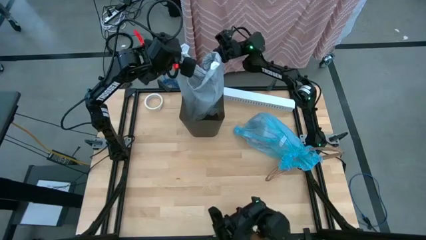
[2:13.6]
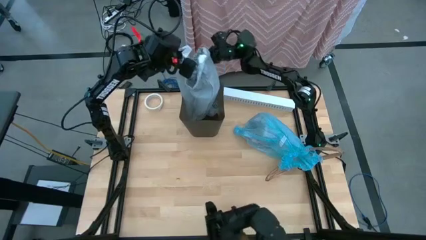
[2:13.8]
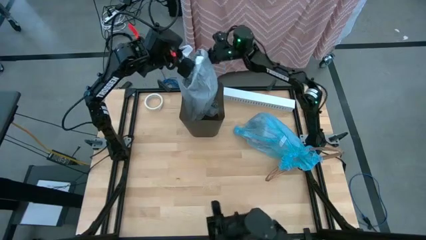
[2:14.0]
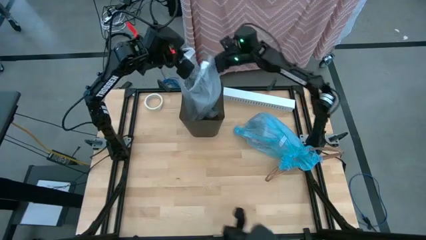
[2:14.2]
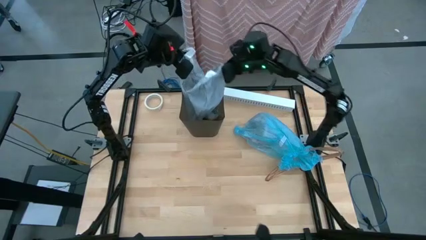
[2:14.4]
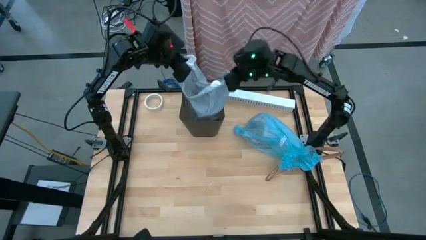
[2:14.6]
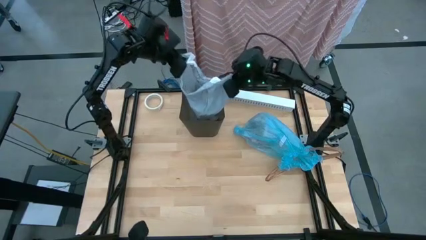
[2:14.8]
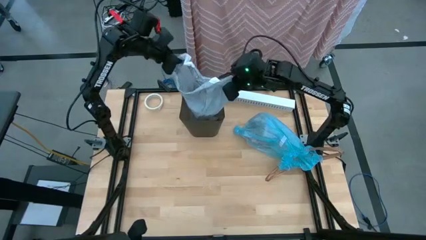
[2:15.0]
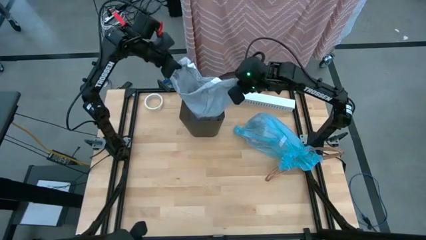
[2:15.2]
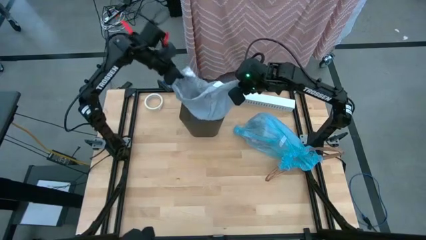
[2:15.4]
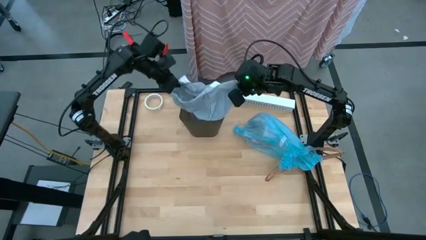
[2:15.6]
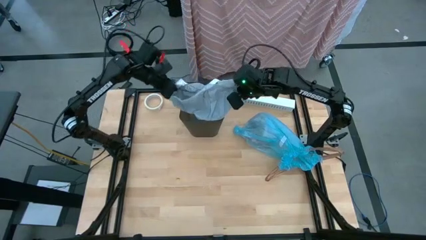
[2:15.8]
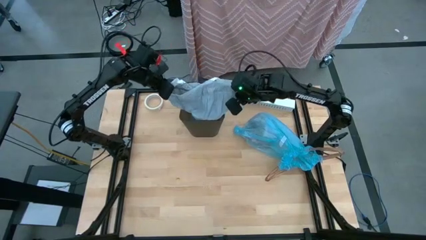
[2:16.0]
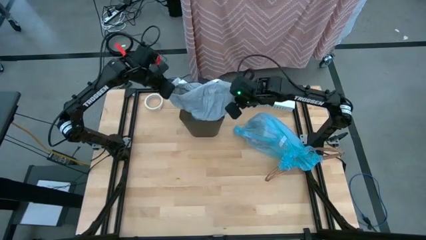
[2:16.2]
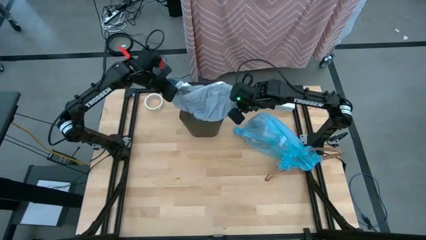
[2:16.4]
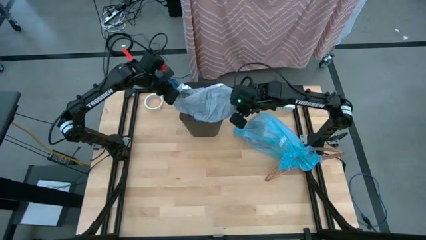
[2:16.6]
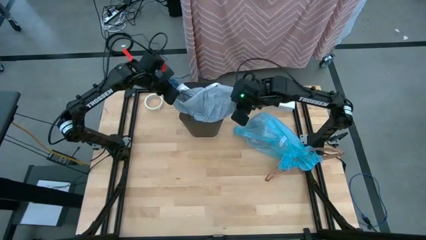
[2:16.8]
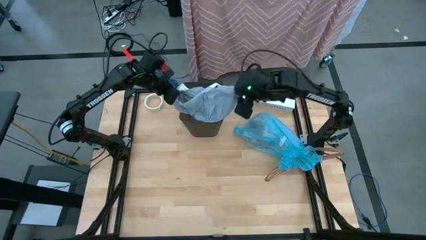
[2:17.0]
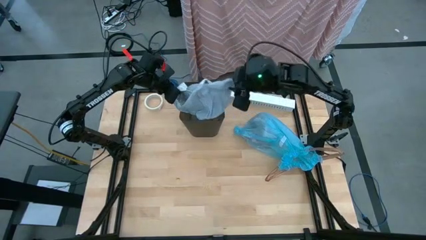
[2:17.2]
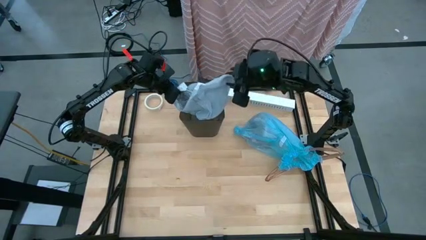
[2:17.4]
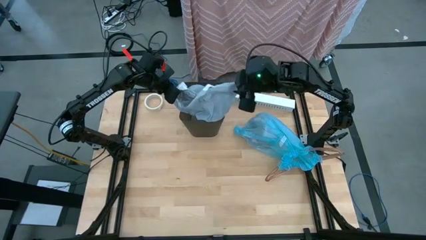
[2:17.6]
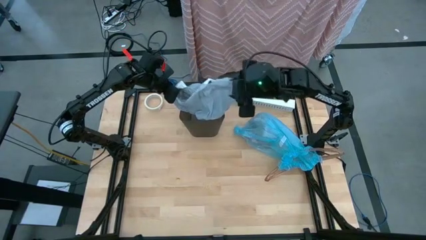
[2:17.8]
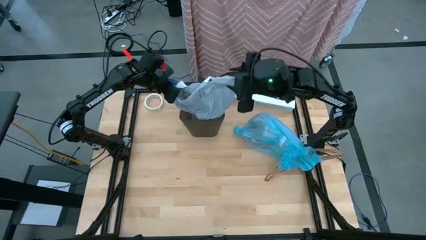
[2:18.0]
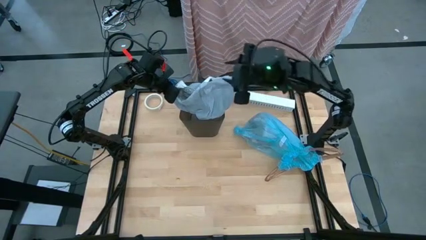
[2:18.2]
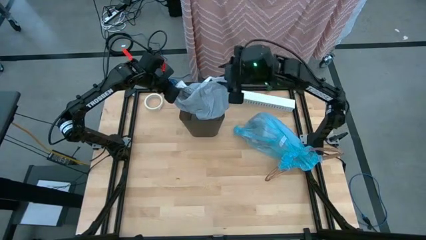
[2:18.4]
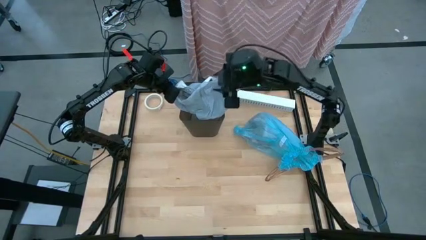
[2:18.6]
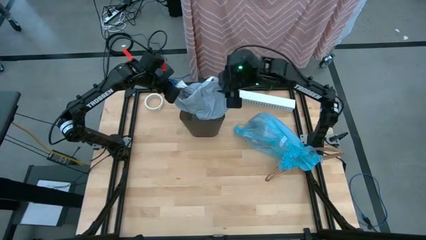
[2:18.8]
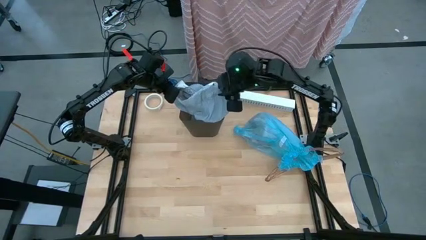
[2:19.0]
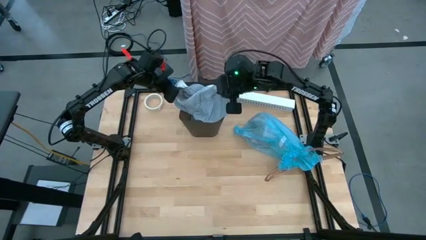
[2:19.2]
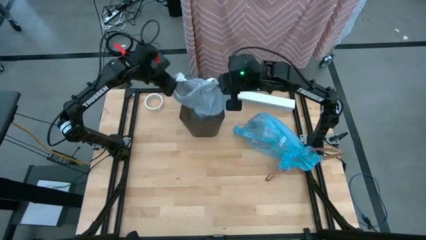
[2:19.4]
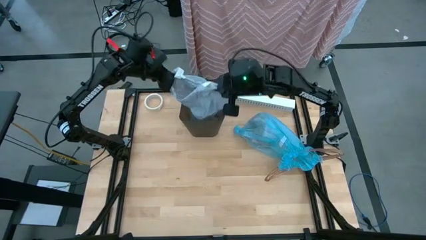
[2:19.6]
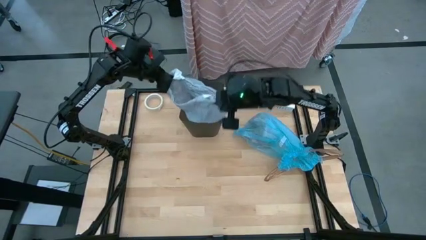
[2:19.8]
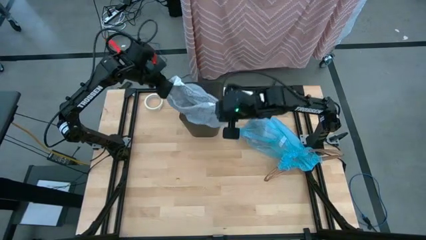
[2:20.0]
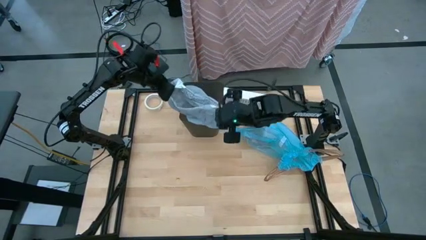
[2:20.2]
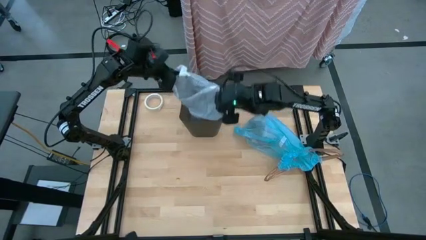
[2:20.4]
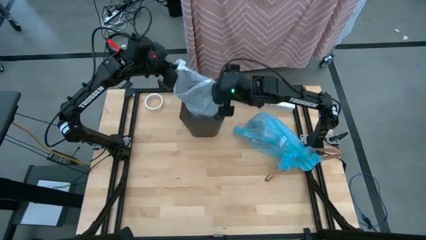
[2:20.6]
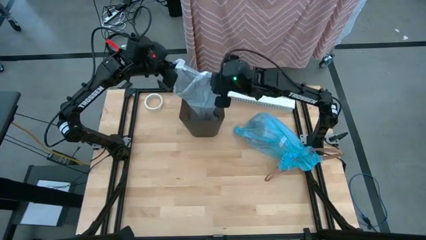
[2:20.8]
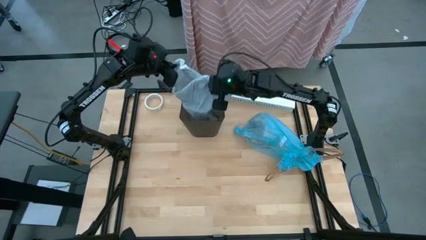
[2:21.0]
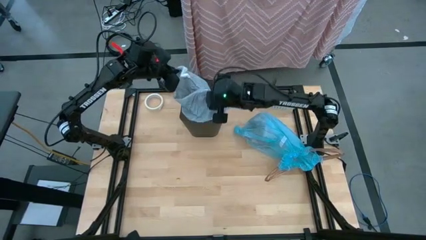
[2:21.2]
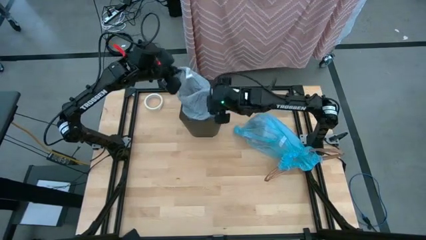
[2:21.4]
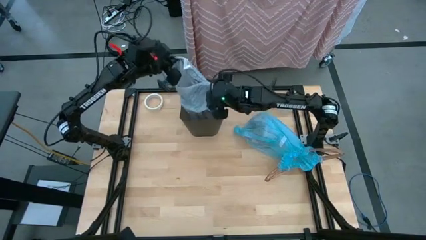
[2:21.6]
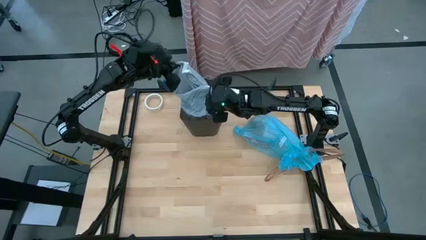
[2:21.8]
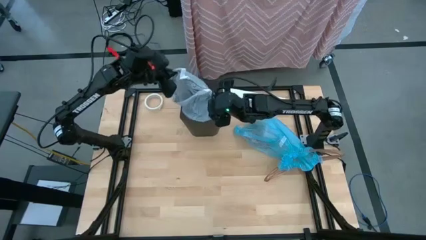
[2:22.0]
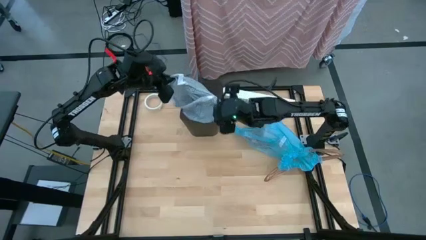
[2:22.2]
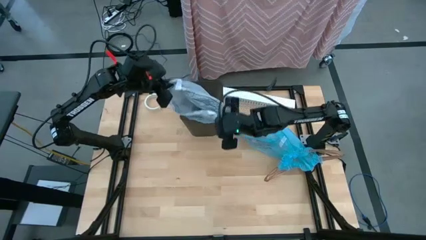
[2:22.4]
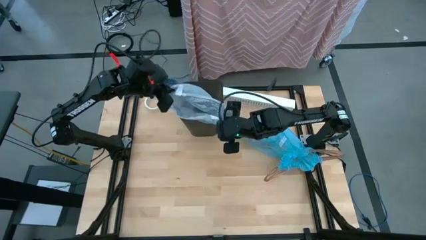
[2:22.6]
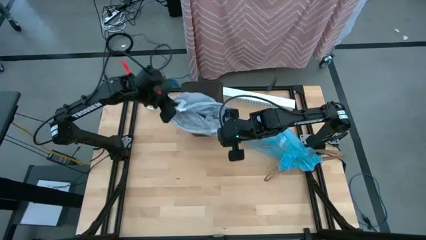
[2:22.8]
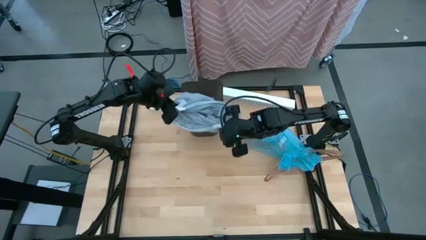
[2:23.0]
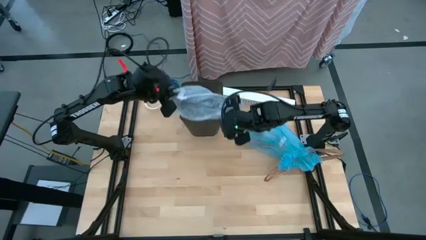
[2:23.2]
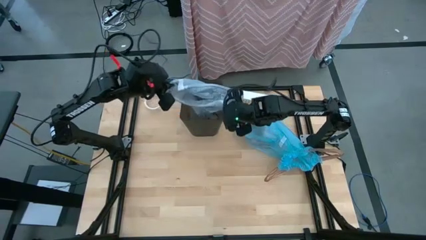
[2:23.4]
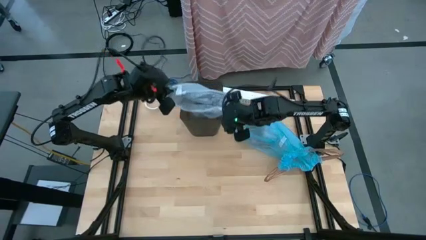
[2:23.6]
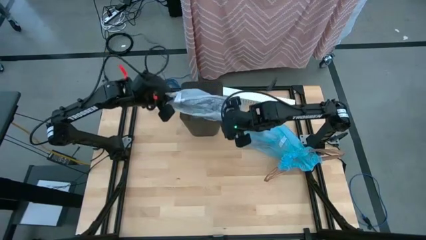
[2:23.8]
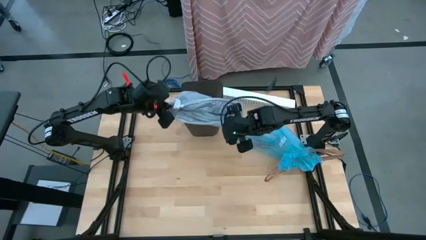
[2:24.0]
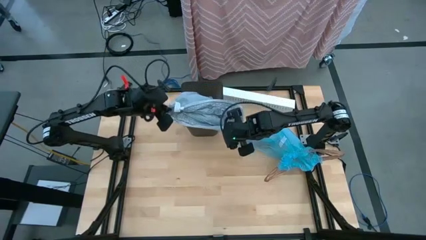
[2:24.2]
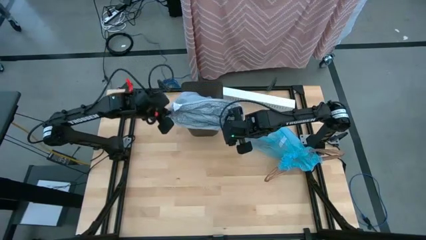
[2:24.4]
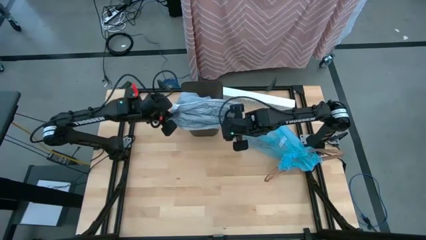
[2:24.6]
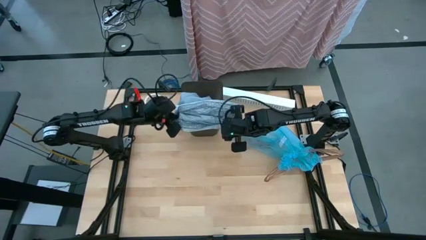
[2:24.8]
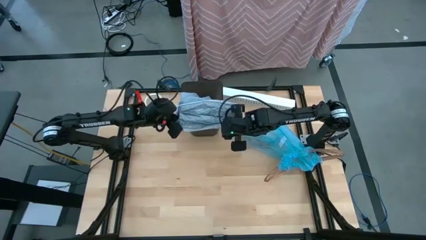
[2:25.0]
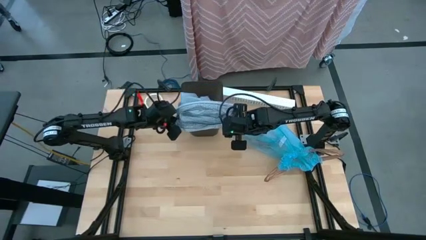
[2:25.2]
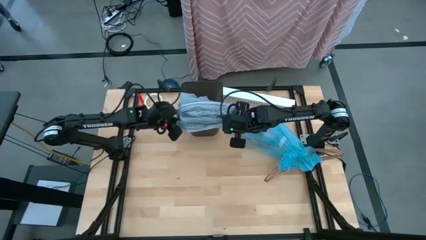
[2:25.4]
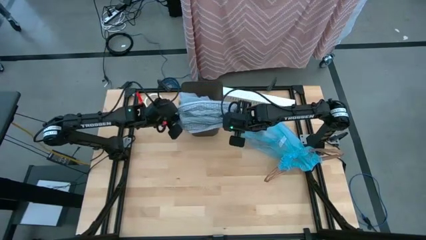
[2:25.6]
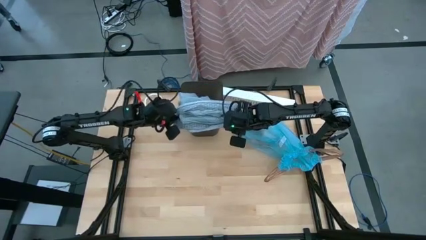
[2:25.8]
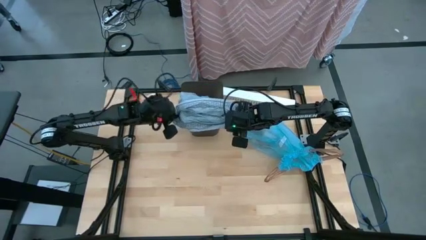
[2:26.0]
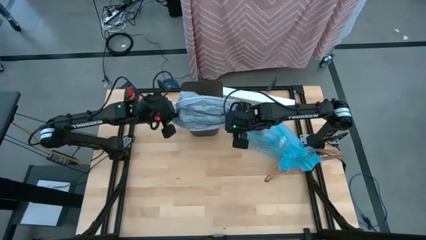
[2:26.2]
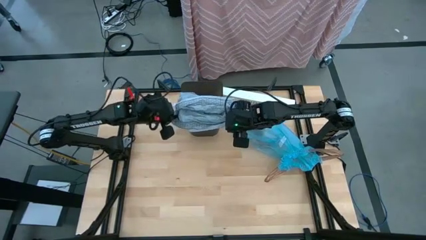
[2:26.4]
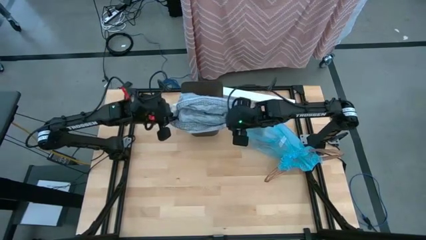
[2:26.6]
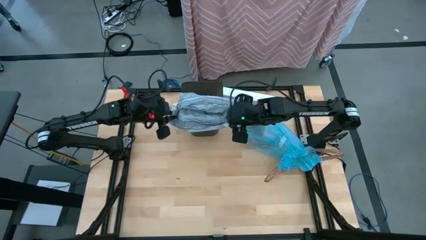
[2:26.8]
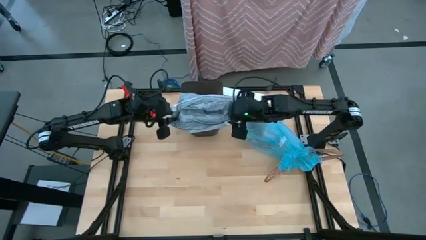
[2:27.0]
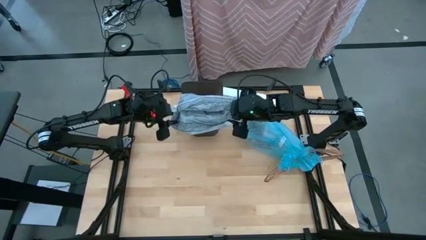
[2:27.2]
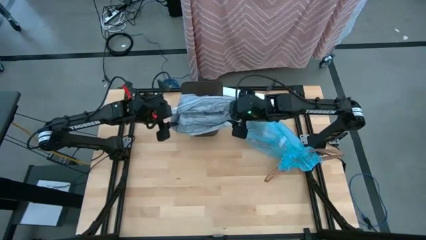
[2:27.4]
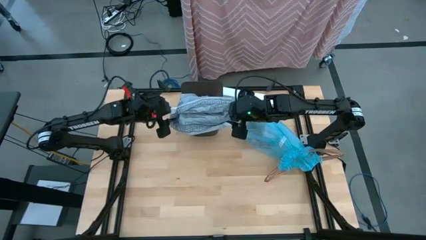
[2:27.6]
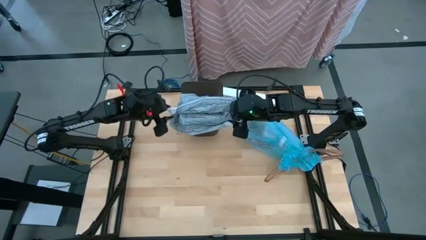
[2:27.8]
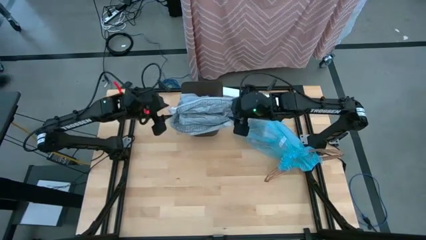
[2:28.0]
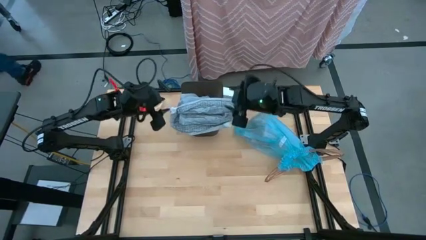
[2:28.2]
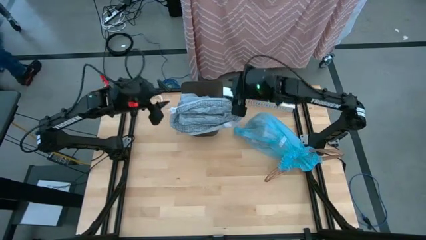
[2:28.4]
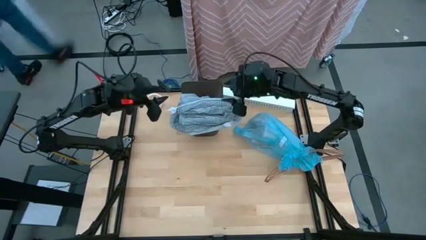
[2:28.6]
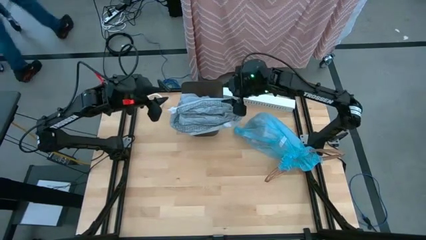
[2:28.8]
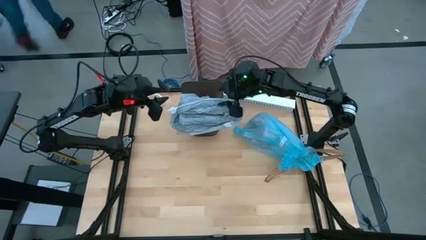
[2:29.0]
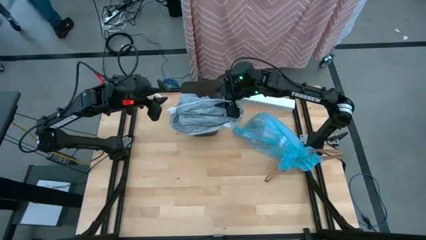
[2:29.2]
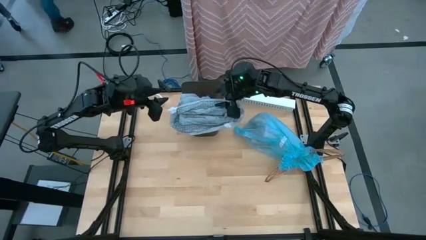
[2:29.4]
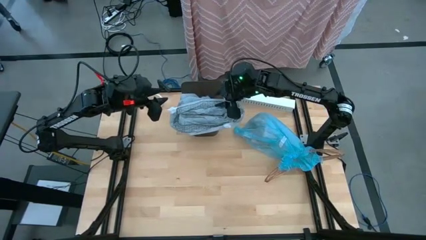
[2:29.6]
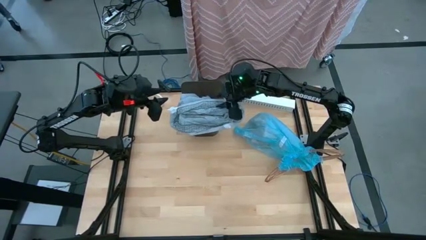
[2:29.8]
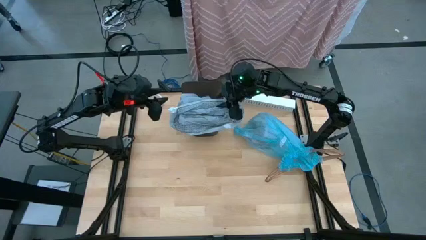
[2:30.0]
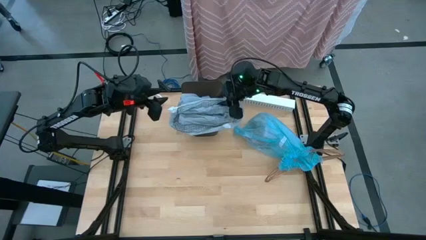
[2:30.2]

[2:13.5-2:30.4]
Task: place trash/remove bag and relplace
Insert the new gray trash bag into the bin
